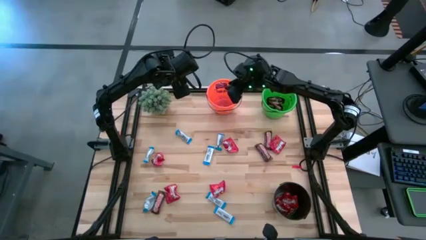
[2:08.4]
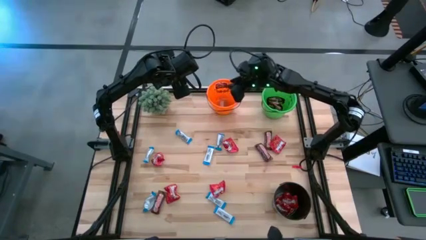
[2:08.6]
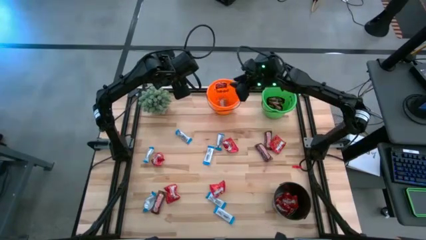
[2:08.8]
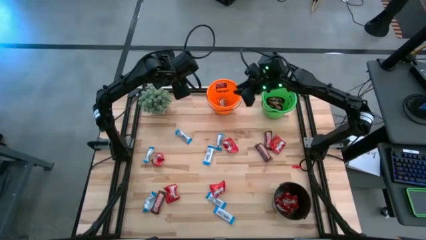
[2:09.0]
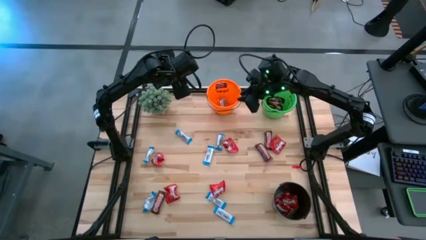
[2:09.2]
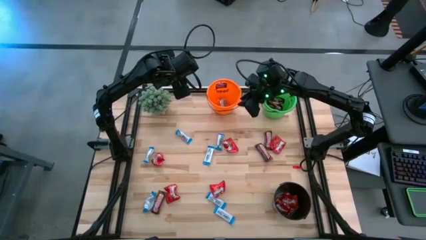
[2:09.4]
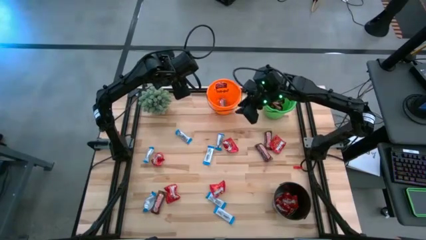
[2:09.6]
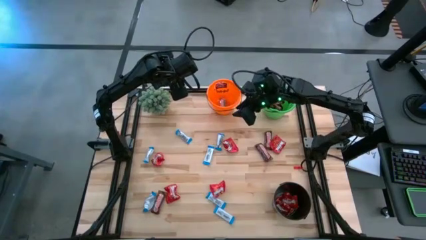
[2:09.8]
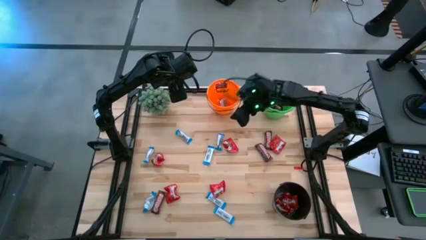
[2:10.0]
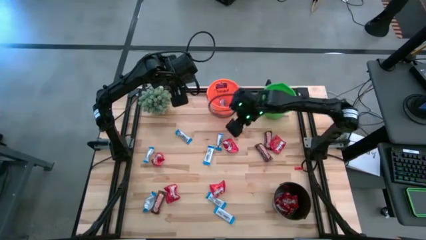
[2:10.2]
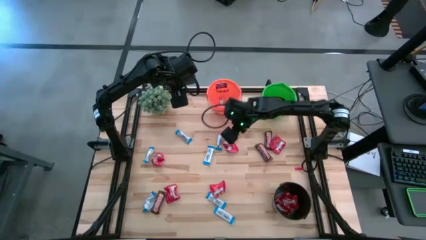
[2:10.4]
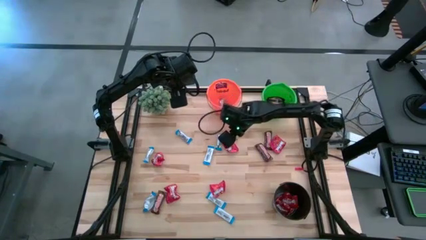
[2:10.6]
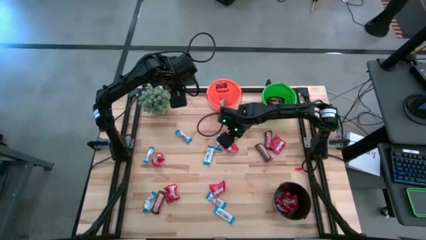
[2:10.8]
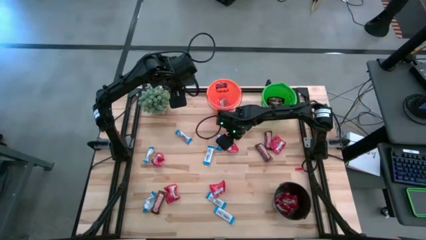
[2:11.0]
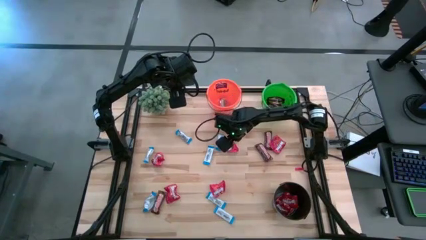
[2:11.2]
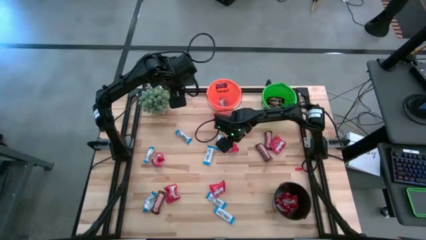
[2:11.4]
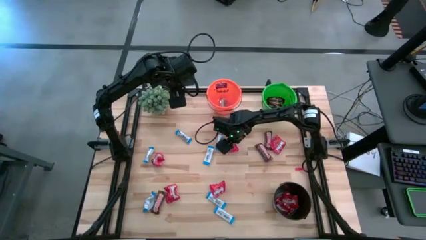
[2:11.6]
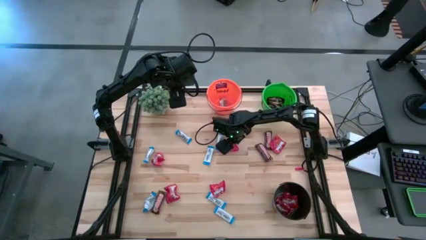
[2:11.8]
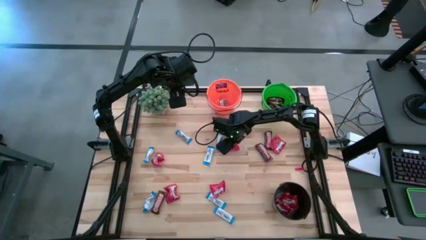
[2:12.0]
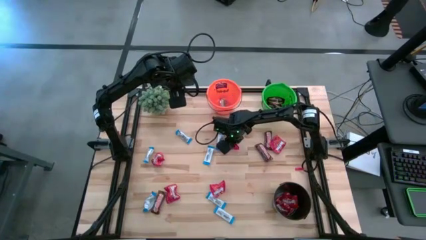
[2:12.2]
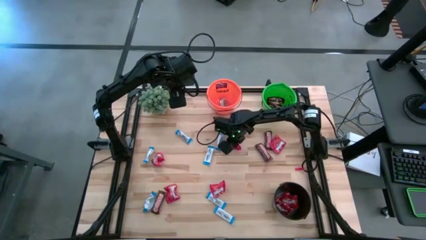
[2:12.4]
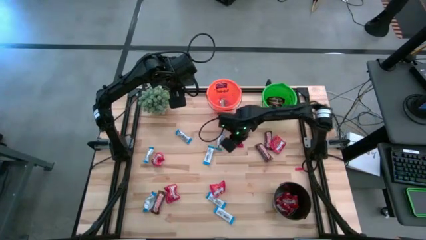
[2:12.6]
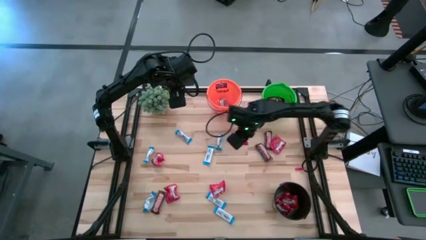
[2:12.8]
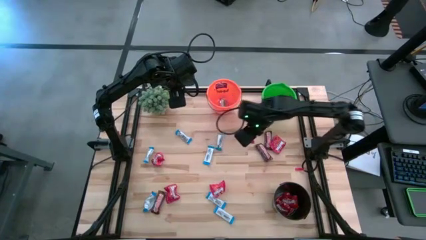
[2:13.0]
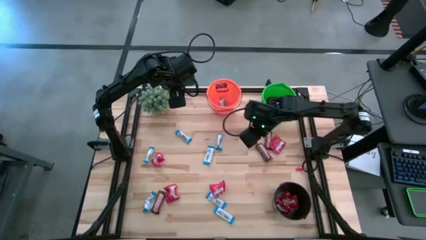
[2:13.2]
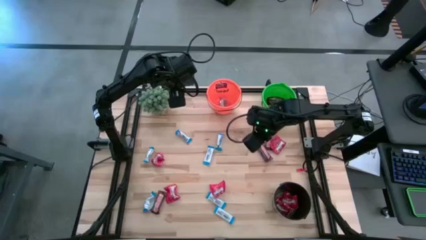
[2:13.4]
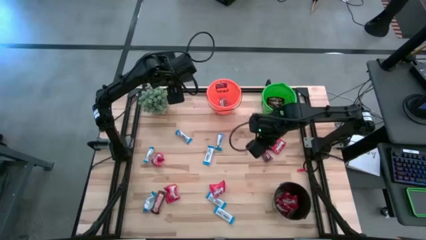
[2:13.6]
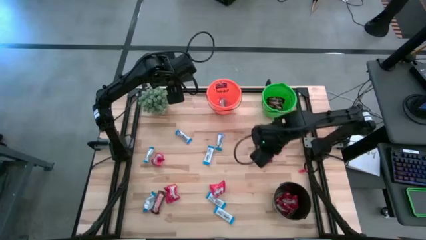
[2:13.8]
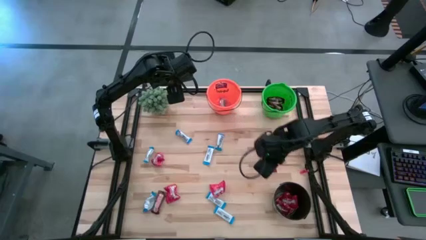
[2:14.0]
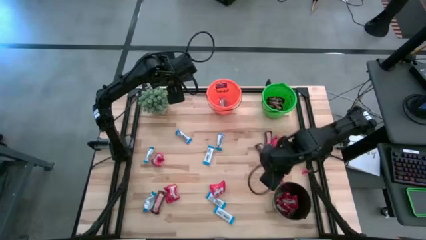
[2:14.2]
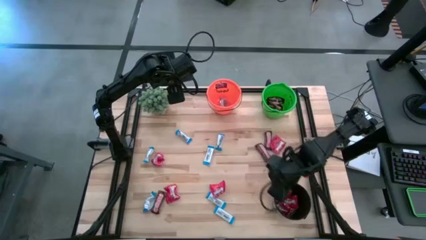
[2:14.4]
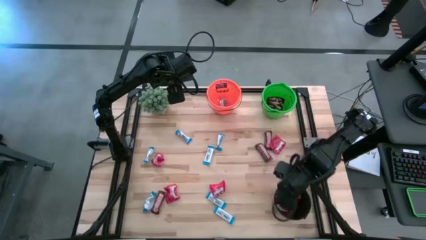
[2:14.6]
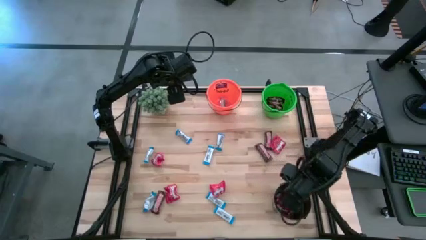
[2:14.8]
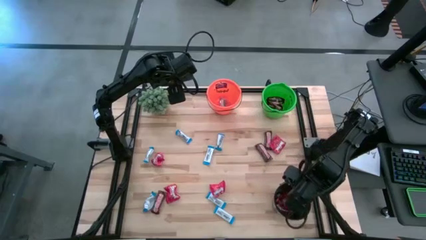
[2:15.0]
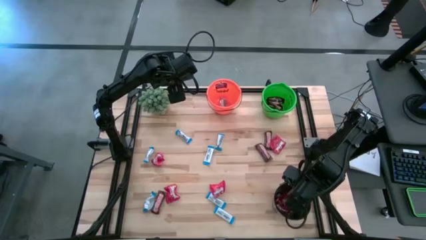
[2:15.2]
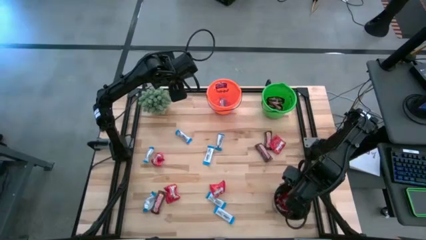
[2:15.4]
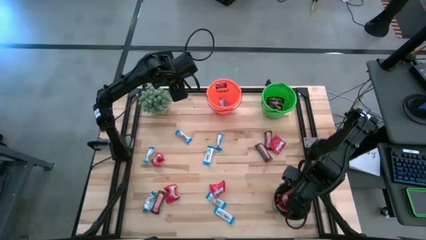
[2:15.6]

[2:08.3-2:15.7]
Task: Organize candy in baskets
Put the red chocolate into the black bucket

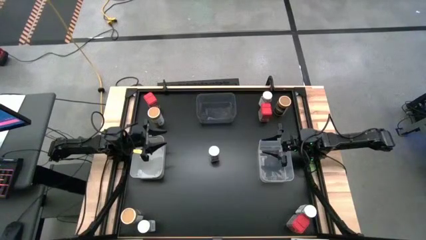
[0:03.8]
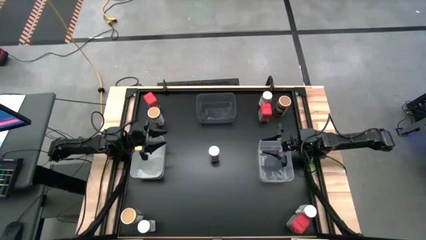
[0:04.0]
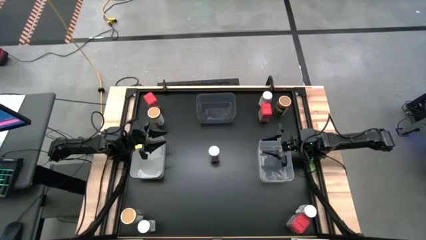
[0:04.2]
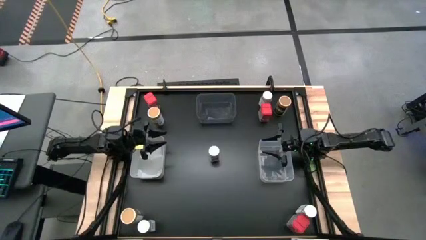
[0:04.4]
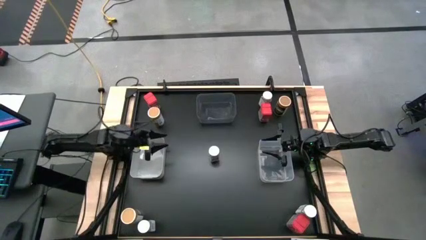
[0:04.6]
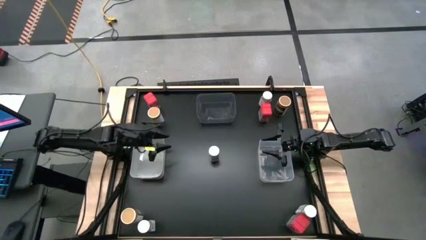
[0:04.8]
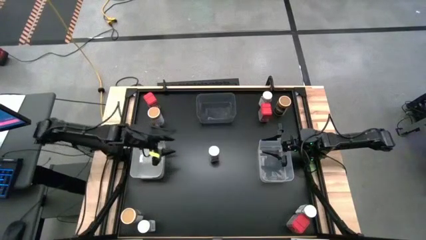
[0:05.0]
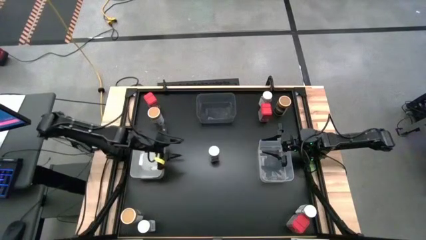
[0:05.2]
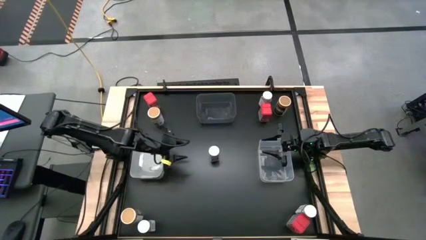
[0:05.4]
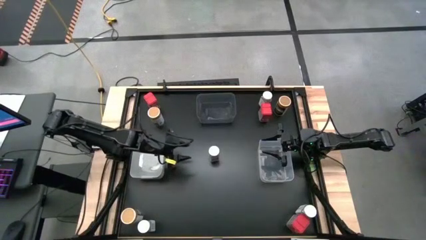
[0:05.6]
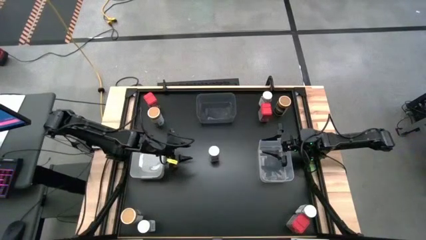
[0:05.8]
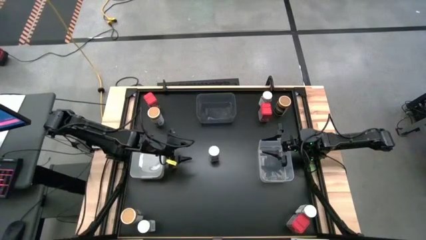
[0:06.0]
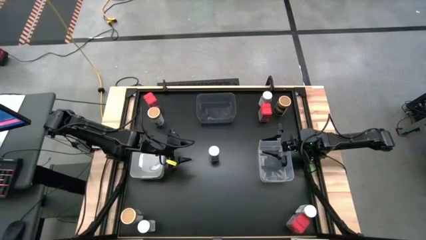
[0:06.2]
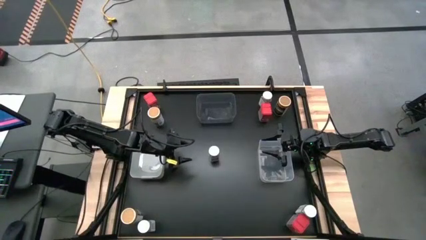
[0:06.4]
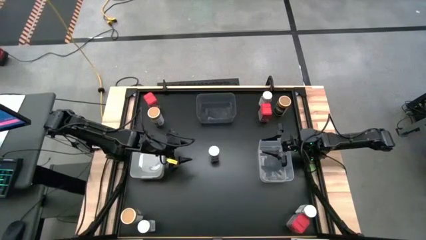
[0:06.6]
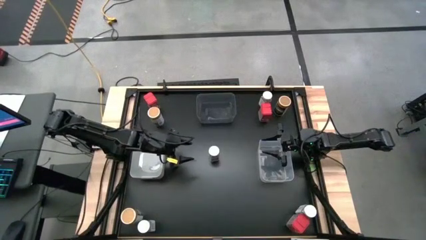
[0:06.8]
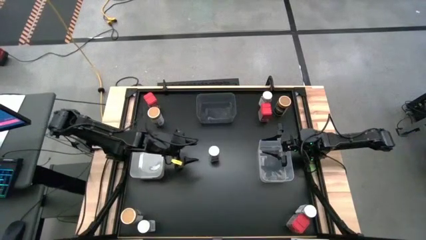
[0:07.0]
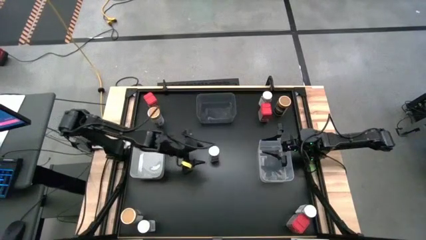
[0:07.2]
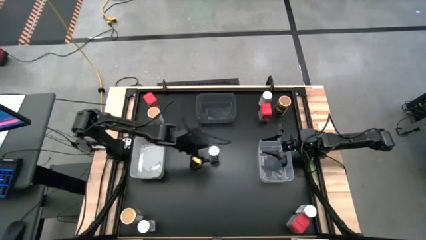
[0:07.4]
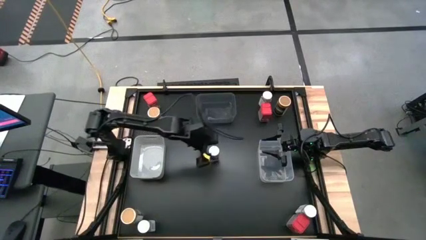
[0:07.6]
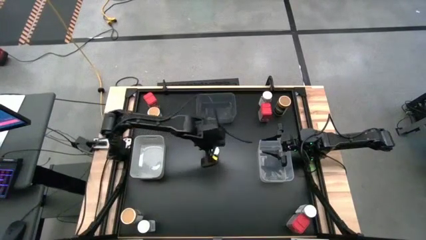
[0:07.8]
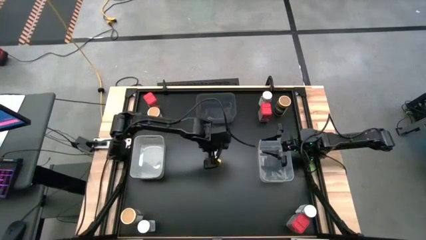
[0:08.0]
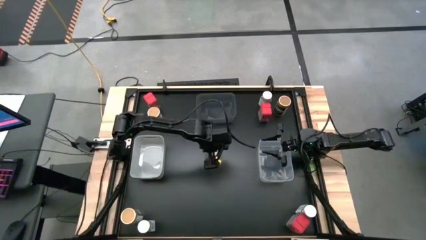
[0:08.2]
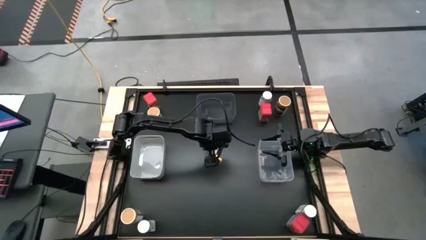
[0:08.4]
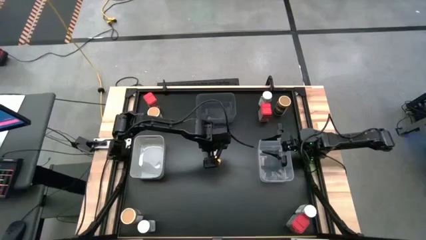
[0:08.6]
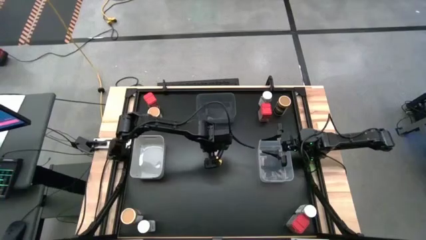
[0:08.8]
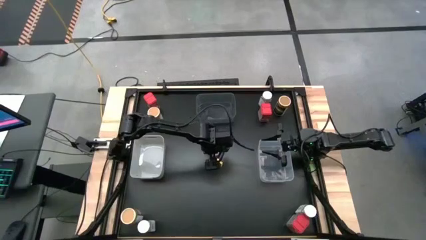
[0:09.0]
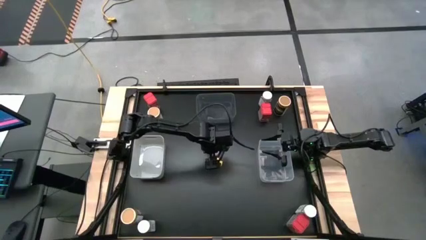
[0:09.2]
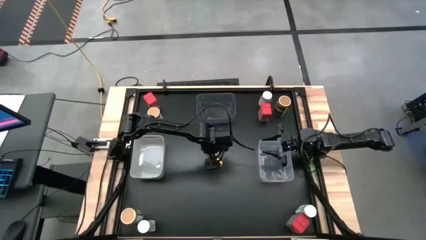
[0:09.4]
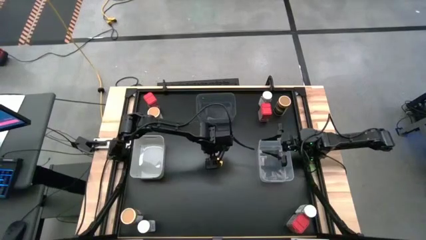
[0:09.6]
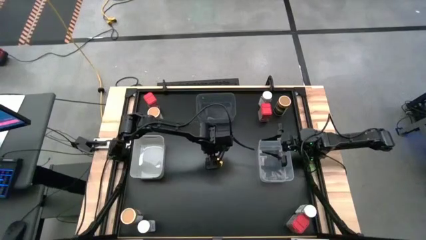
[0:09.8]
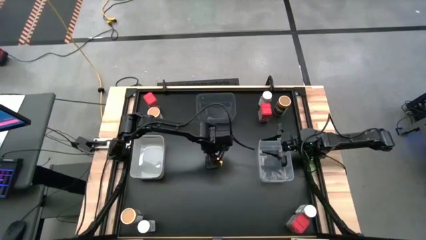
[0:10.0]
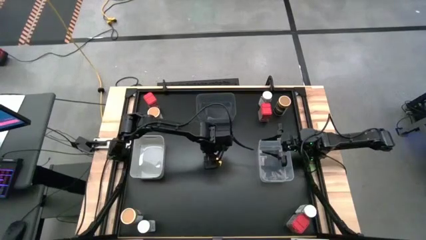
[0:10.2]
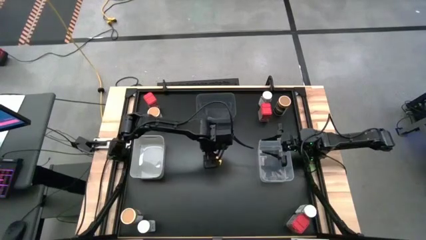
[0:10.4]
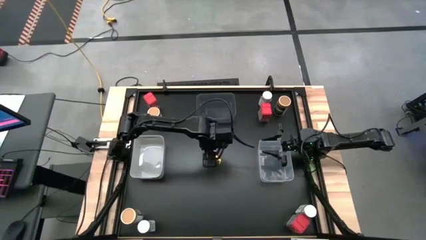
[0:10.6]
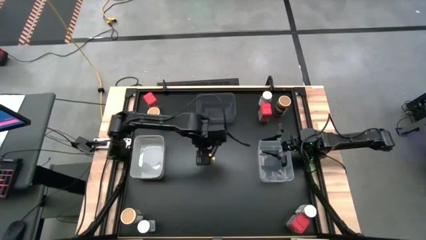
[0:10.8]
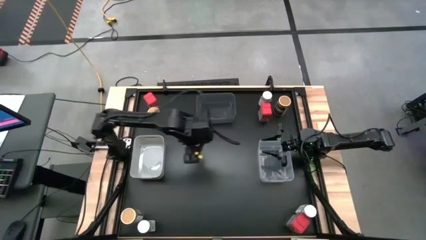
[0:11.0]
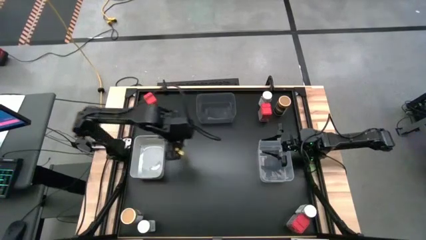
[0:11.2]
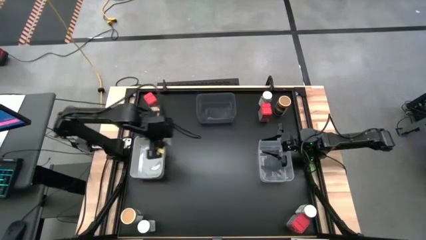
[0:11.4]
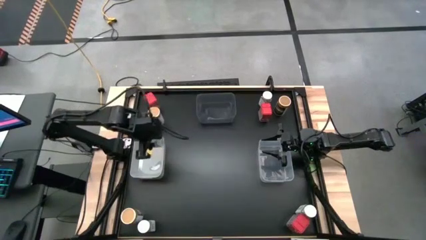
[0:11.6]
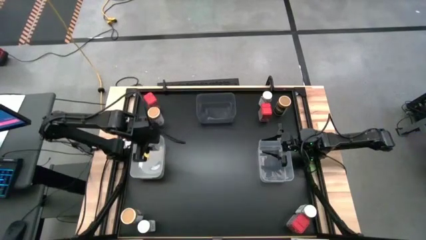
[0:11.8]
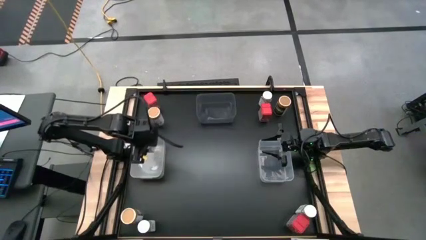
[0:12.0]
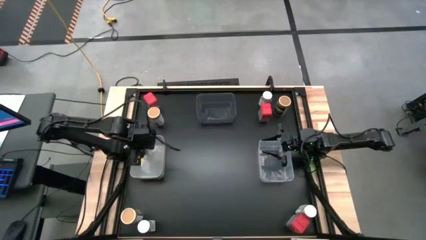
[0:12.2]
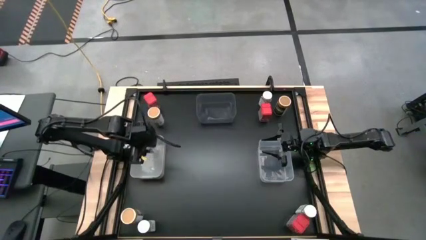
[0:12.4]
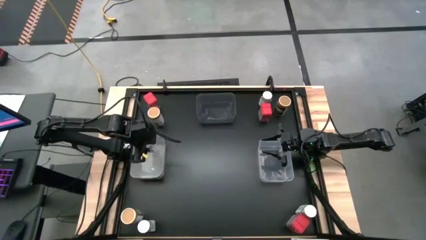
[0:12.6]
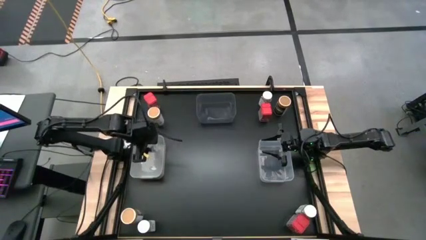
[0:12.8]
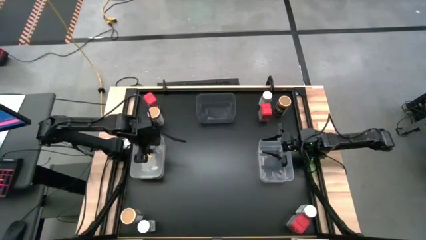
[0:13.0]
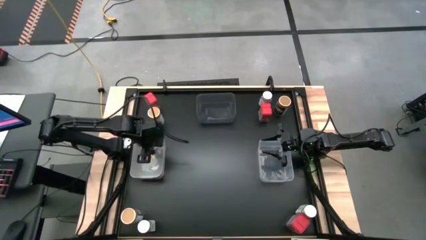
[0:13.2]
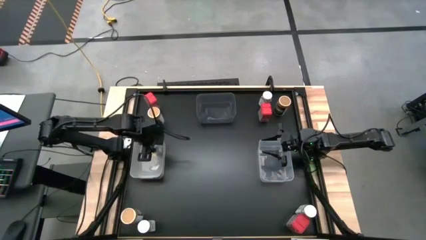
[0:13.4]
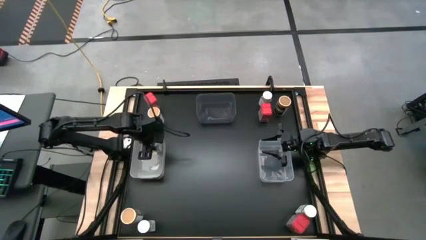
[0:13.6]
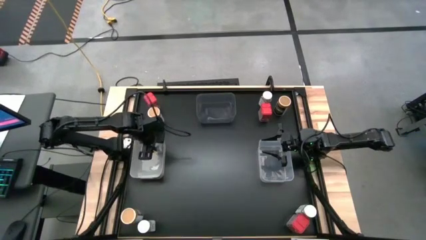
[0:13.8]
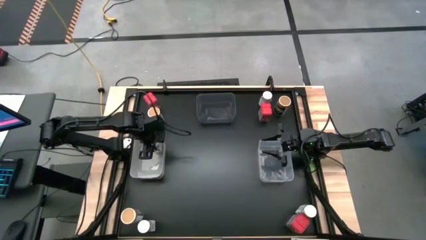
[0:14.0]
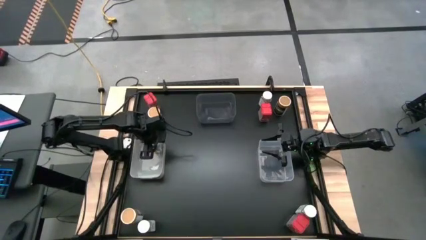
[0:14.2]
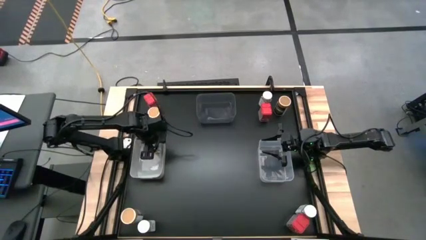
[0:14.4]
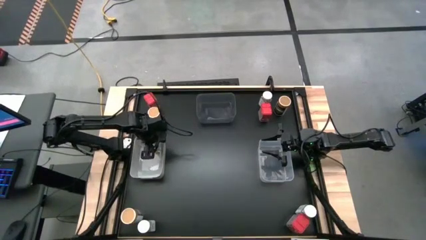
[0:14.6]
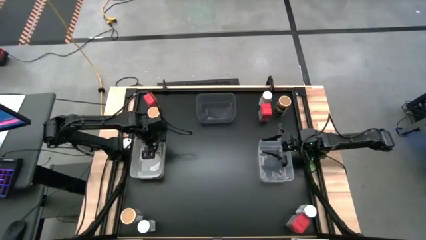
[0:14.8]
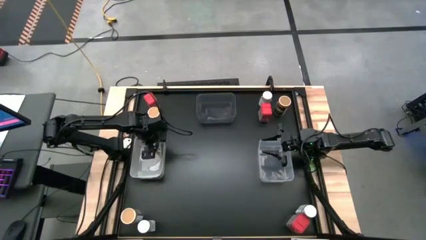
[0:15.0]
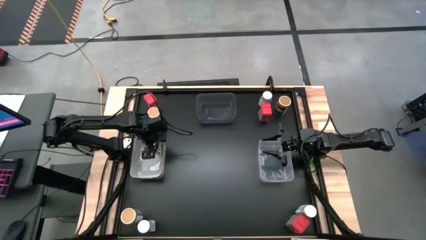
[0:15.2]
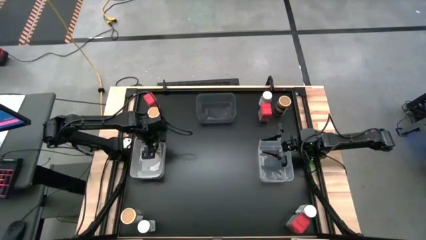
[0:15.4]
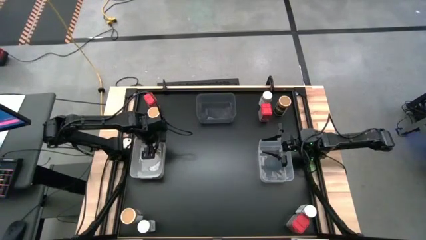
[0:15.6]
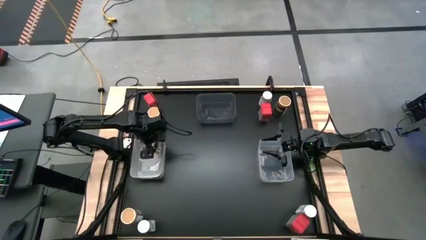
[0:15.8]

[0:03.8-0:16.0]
Task: Sort spices by type
Put the middle white seasoning bottle into the white bin
